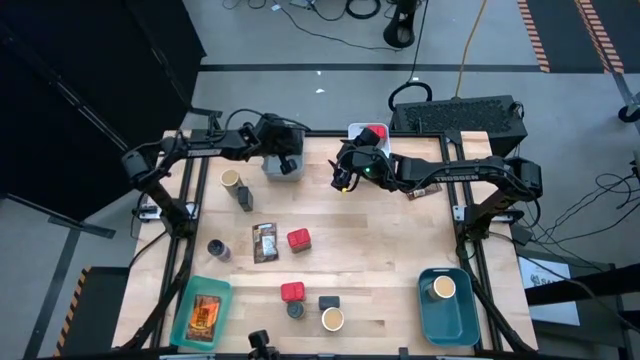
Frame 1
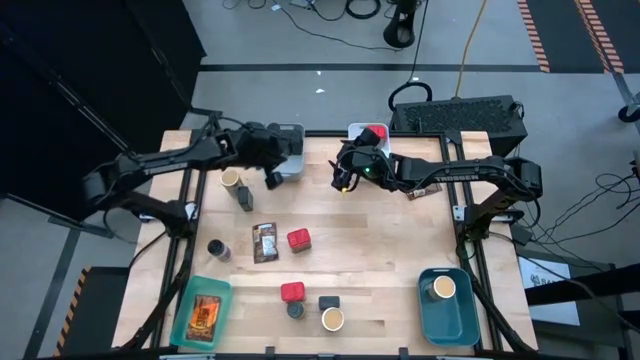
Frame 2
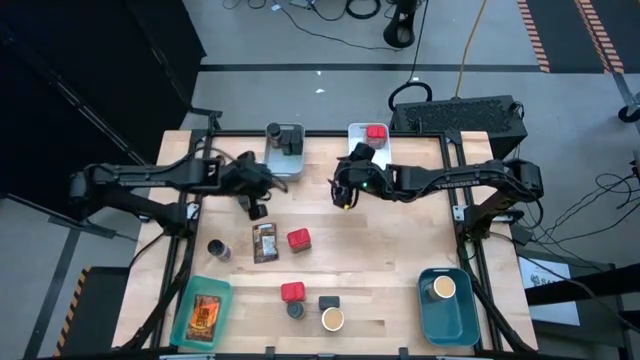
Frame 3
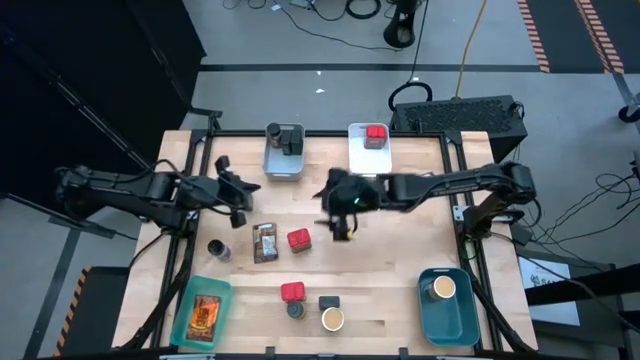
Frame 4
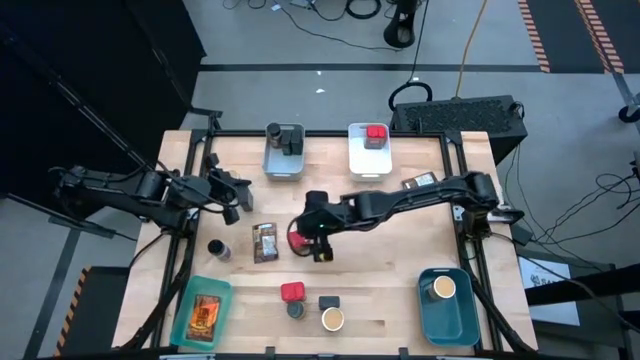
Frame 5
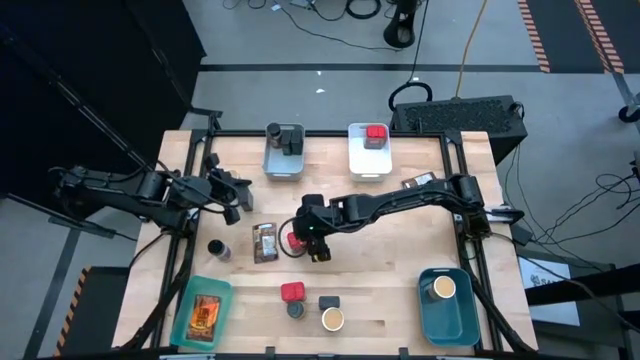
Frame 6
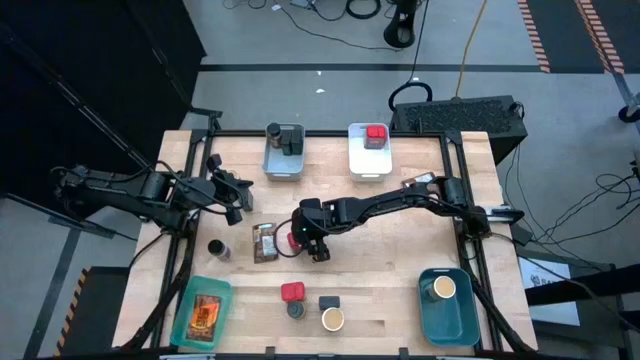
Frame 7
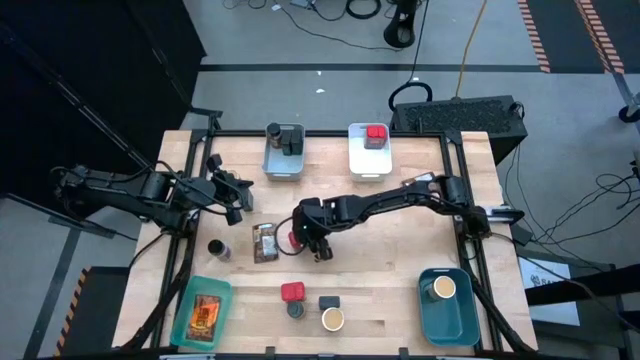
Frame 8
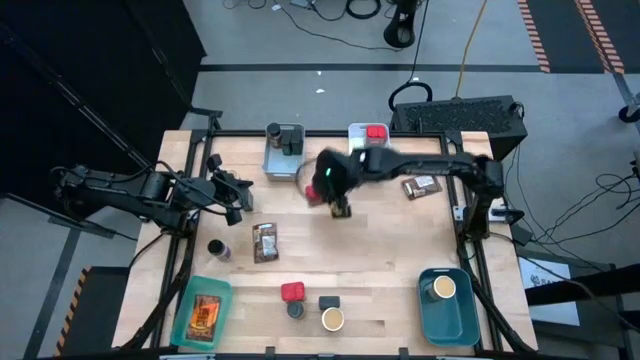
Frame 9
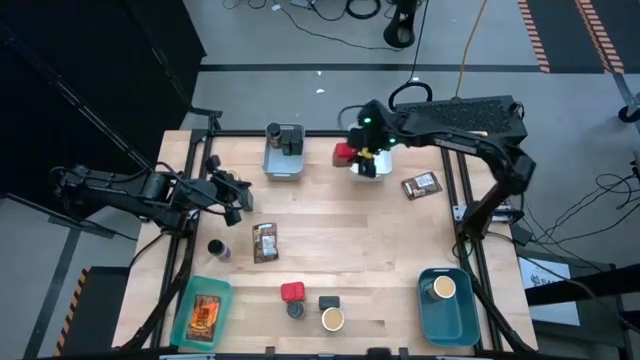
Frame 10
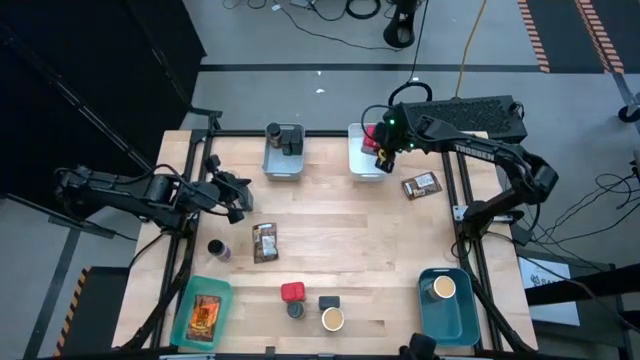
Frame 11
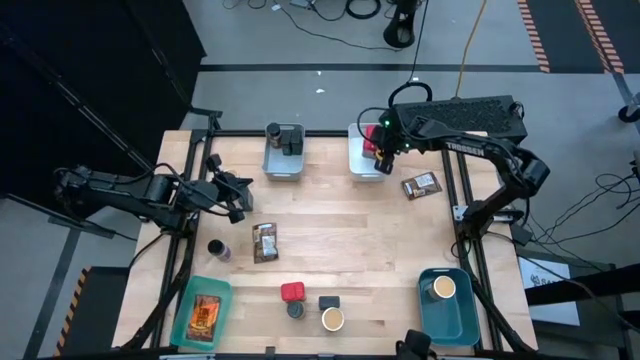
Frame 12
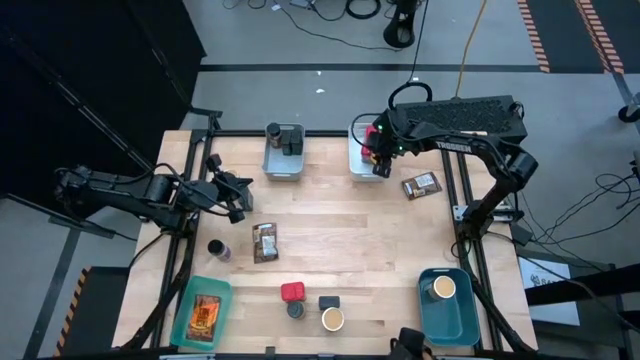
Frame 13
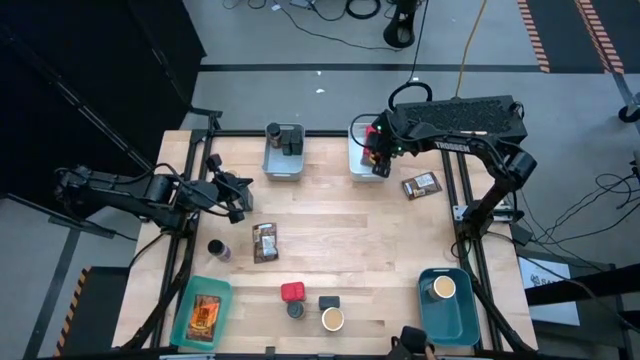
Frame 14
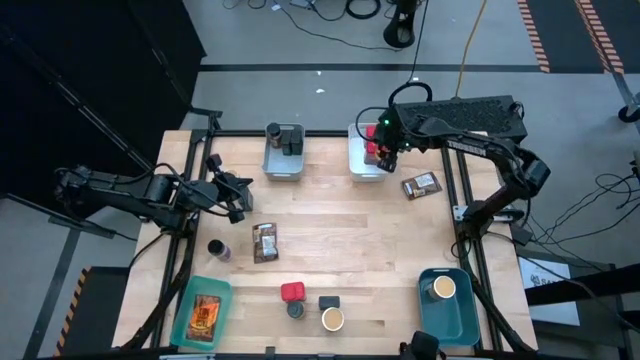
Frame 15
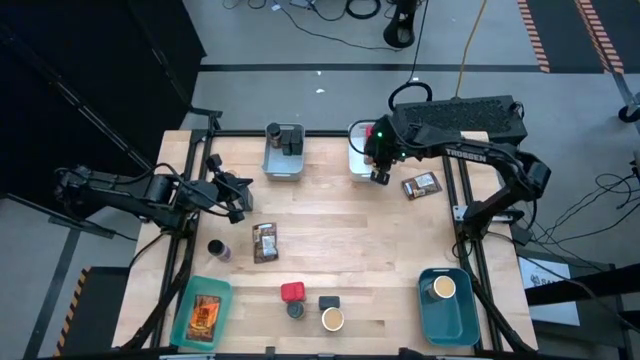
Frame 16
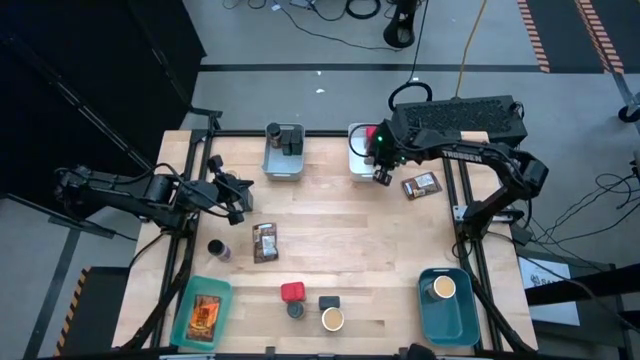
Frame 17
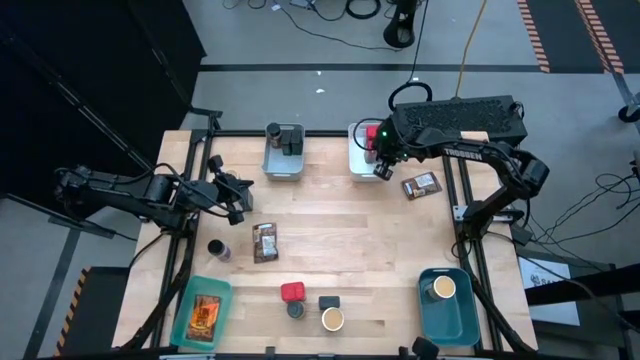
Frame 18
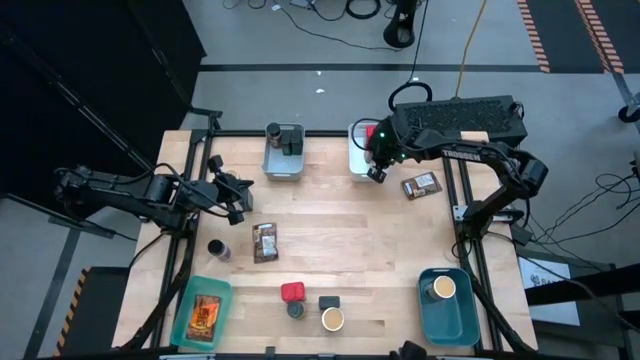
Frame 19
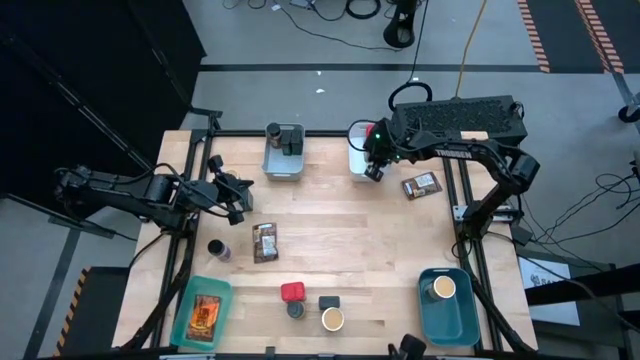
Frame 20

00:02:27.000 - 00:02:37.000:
Task: Sort spices by type
Put the red spice can into the white bin

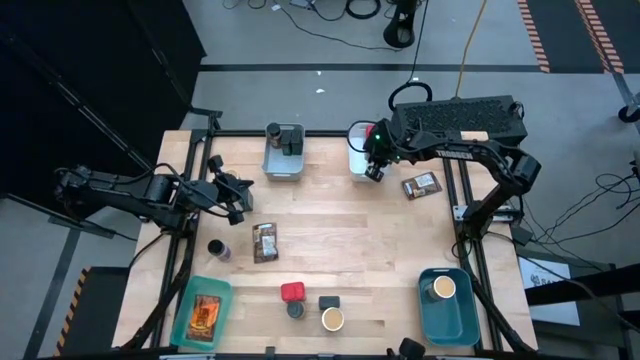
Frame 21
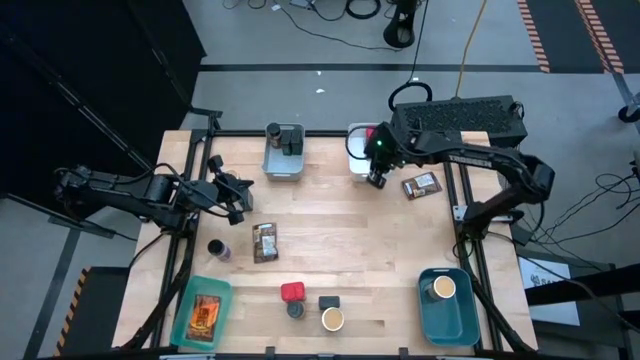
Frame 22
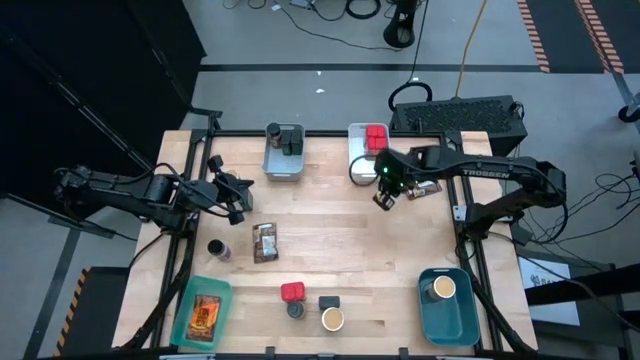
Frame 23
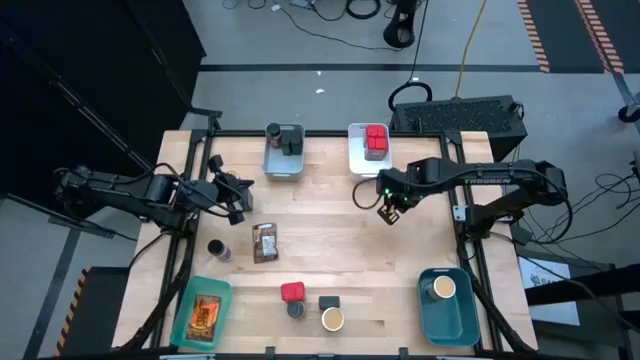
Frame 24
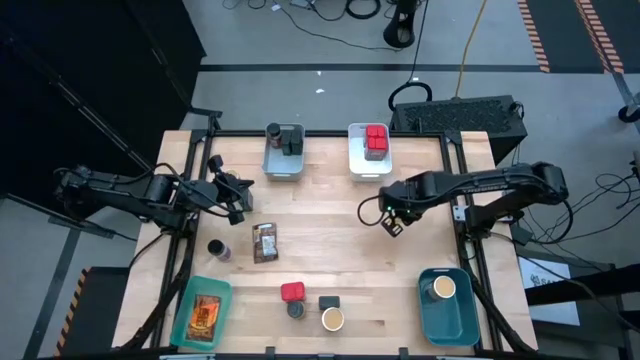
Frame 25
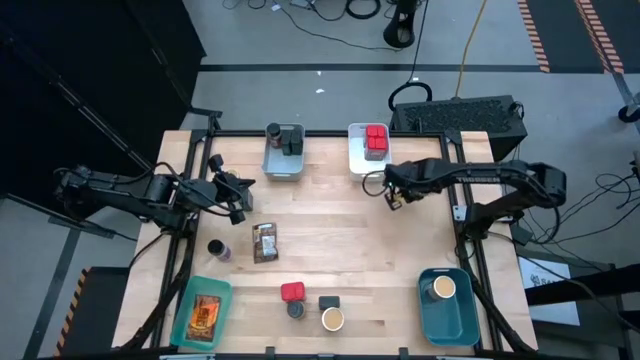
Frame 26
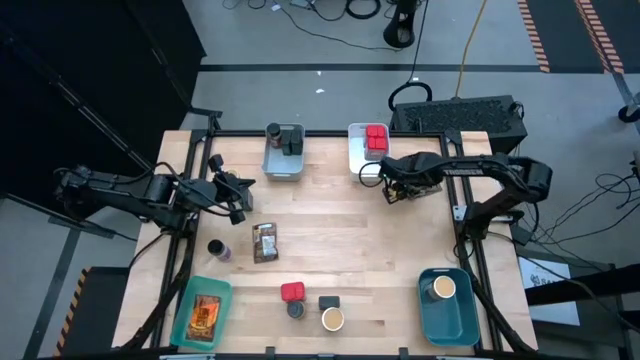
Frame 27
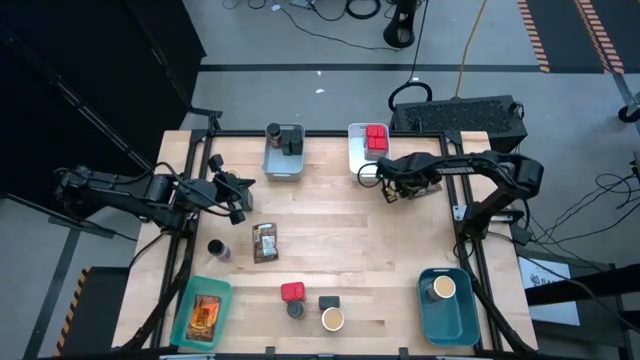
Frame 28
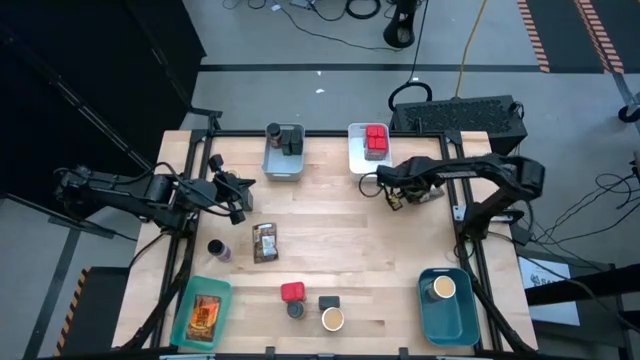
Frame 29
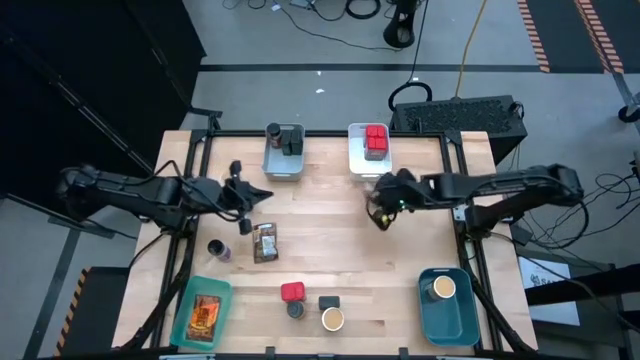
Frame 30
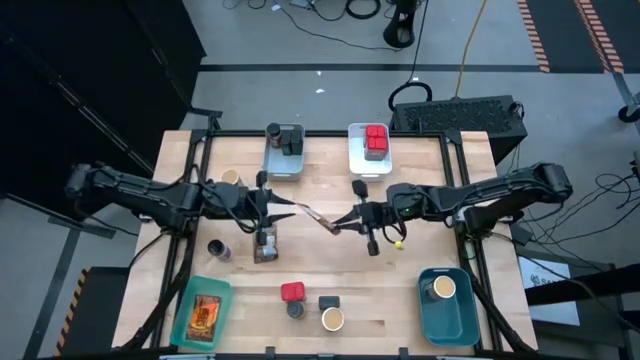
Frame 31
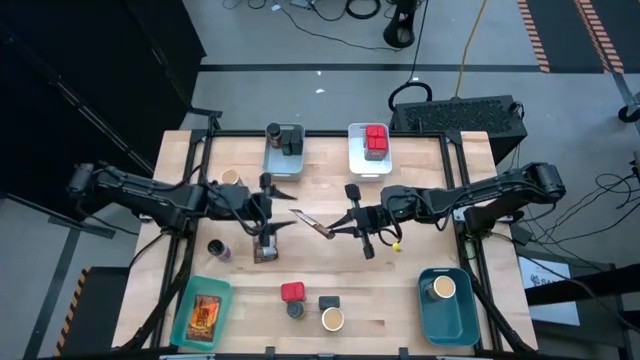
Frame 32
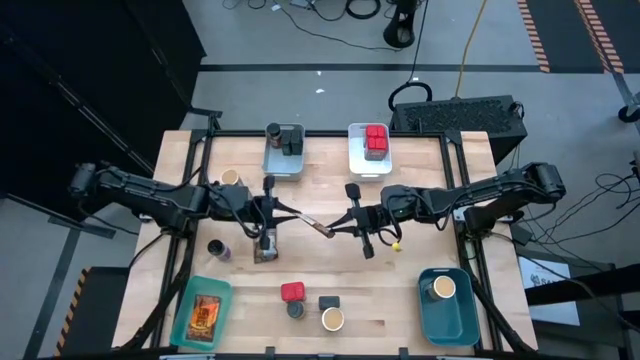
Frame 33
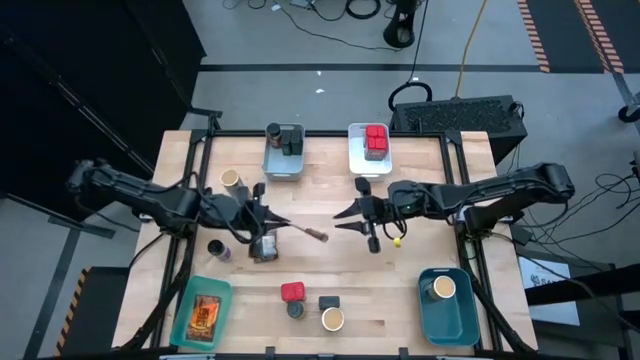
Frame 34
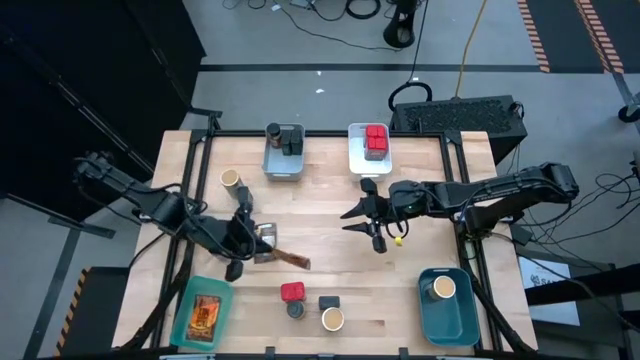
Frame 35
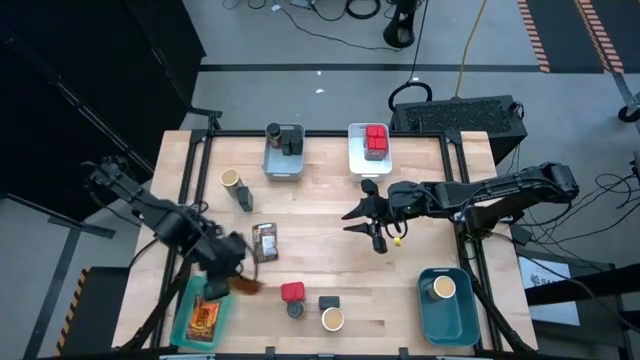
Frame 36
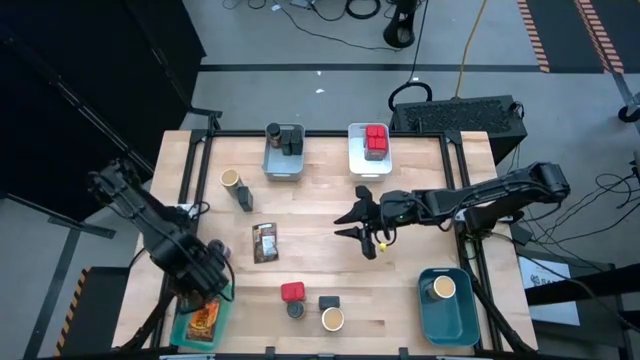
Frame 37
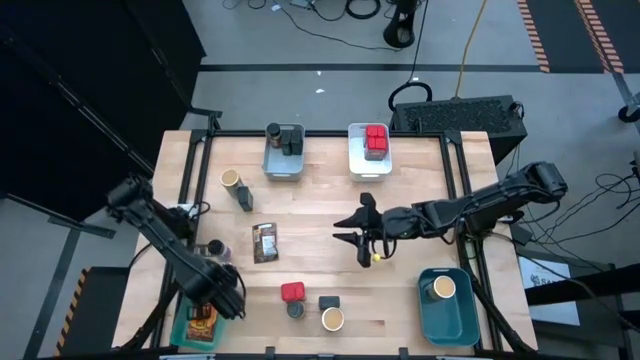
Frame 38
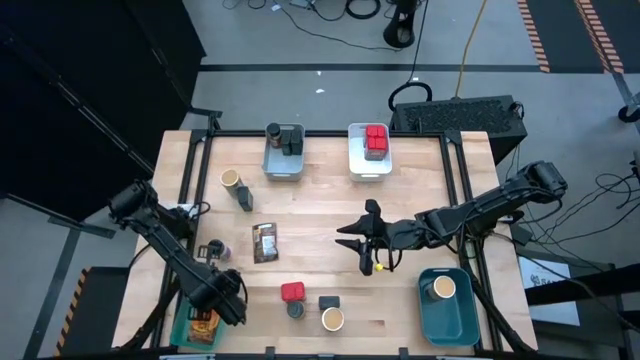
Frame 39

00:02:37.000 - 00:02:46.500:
Put the orange spice pack into the green bin

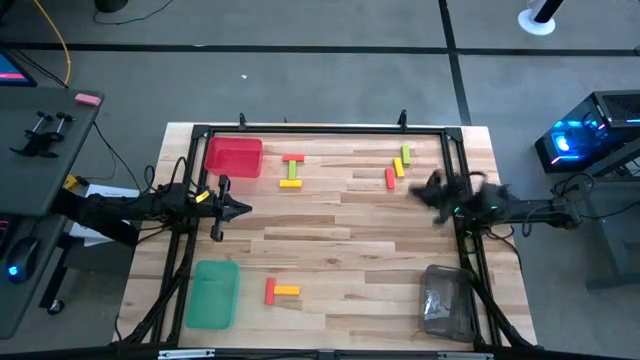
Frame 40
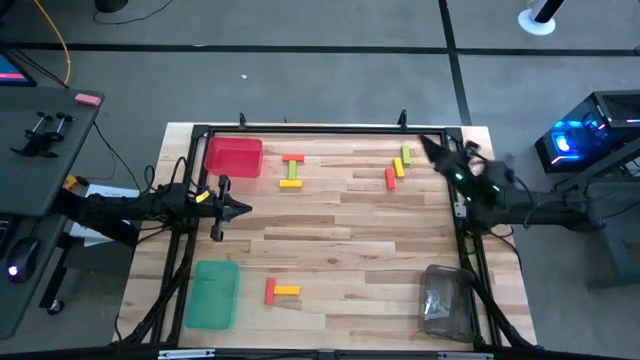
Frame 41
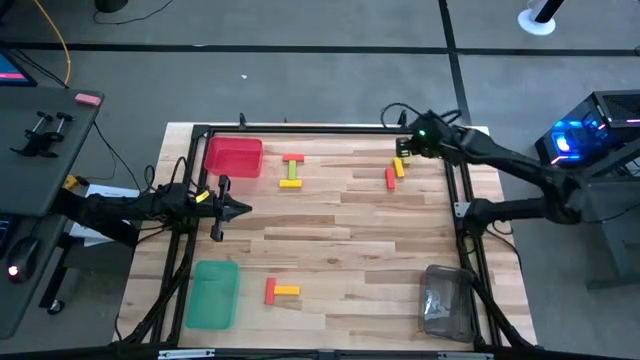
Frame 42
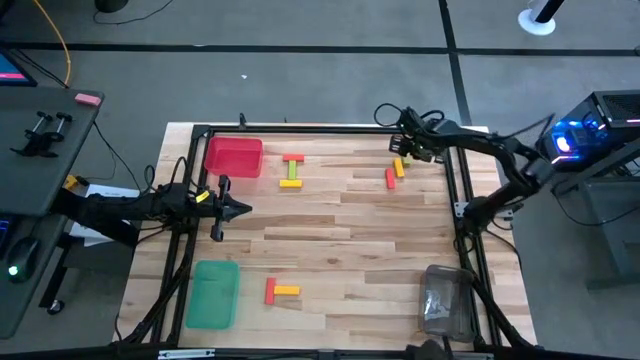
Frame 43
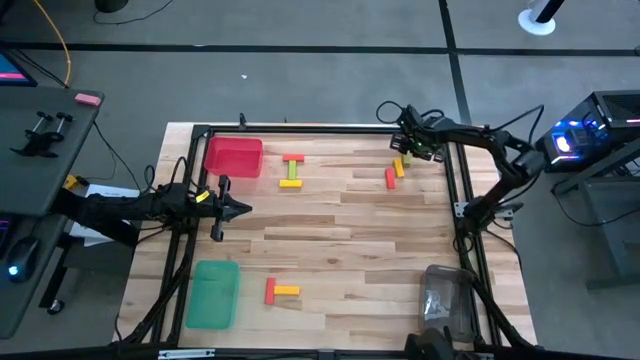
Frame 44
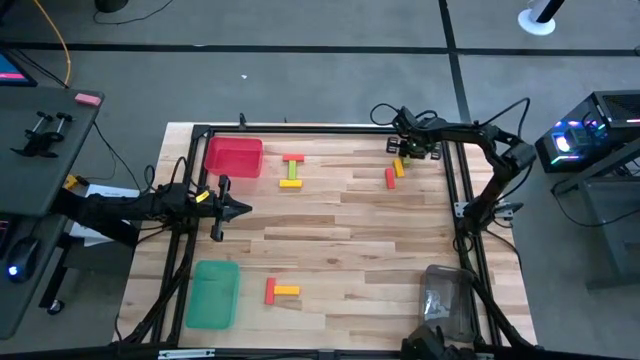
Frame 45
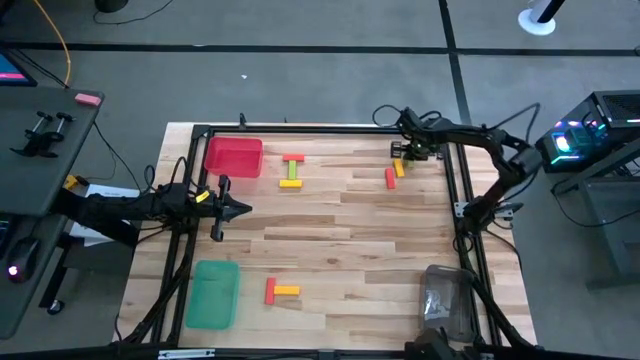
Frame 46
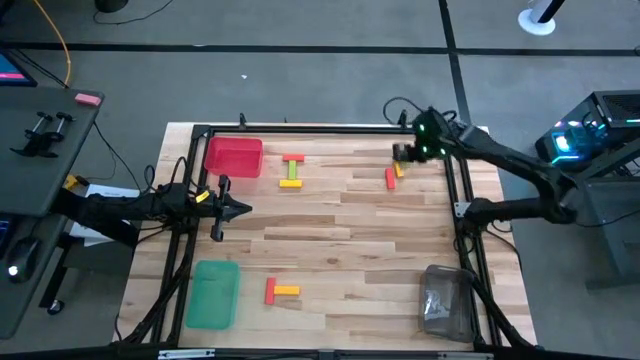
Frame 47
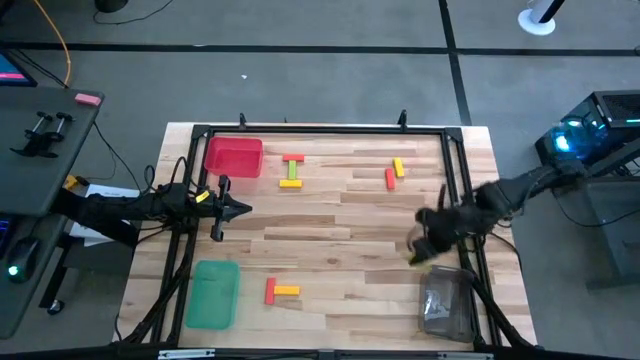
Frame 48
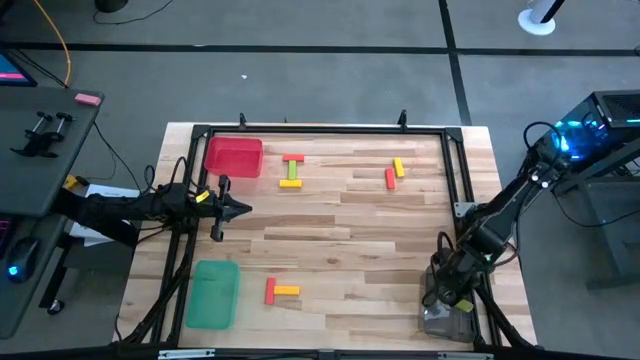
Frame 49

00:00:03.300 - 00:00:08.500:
Task: Sort blocks
Put the right green block into the black bin
